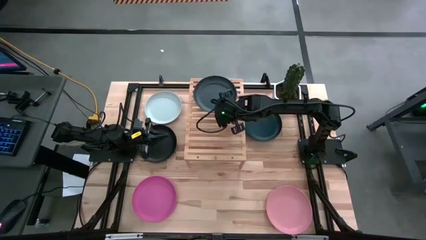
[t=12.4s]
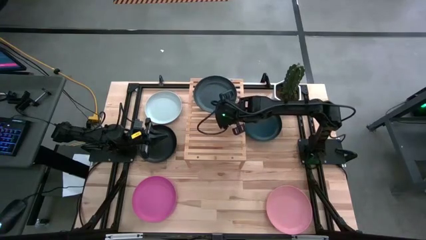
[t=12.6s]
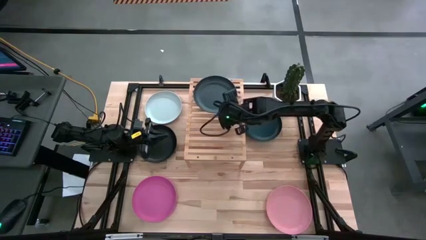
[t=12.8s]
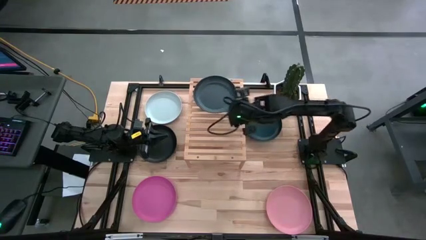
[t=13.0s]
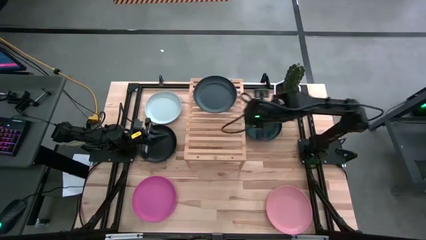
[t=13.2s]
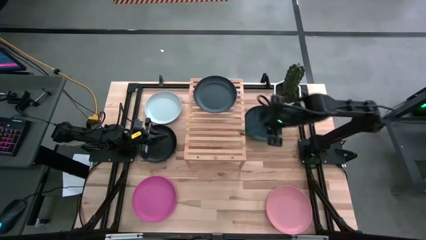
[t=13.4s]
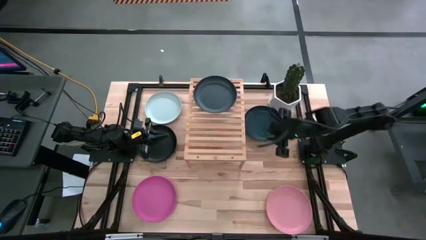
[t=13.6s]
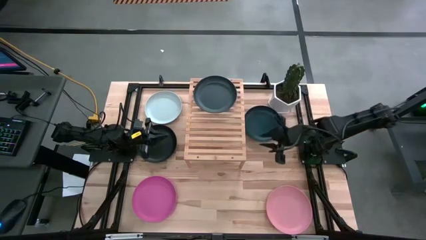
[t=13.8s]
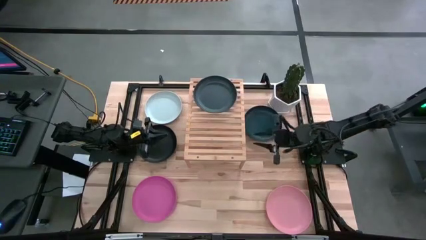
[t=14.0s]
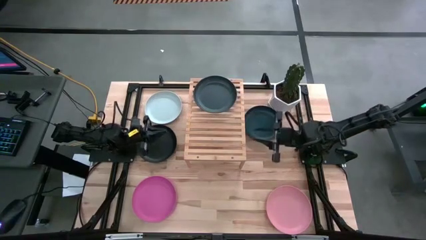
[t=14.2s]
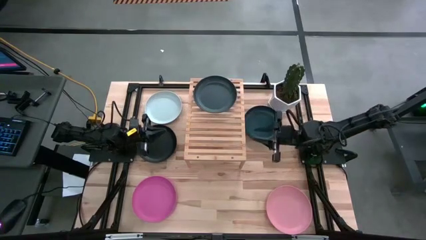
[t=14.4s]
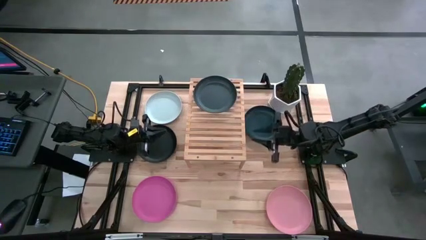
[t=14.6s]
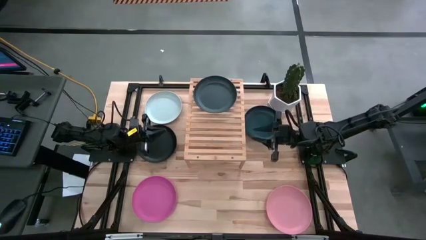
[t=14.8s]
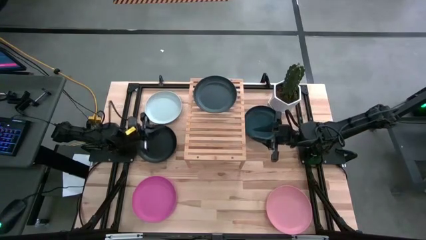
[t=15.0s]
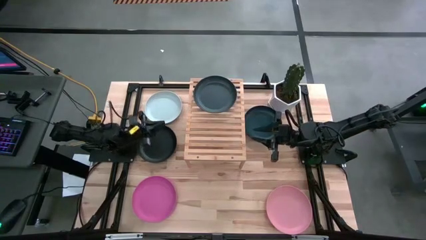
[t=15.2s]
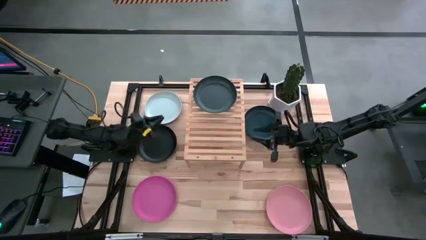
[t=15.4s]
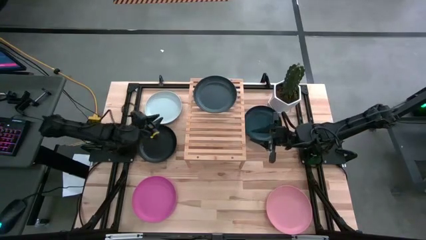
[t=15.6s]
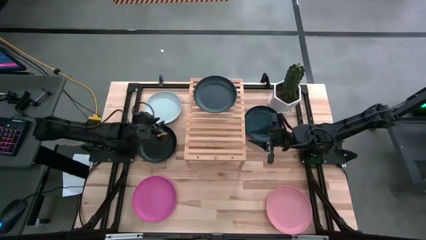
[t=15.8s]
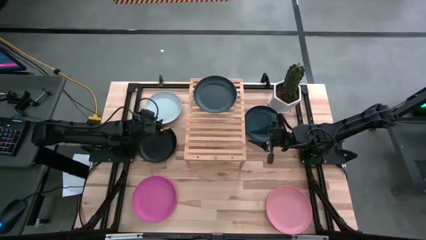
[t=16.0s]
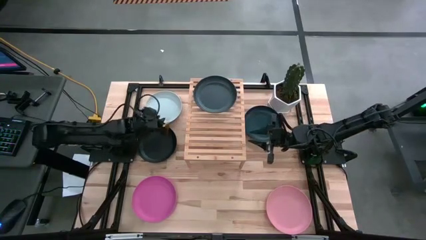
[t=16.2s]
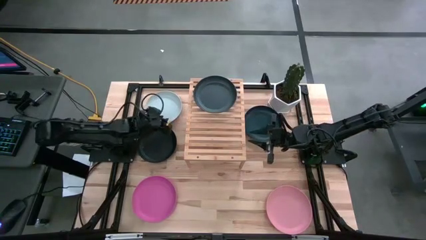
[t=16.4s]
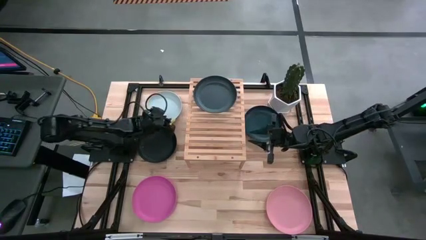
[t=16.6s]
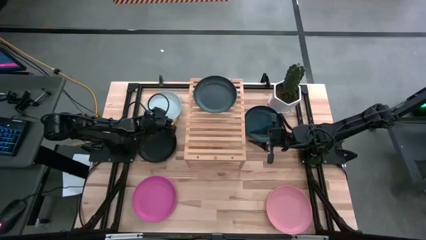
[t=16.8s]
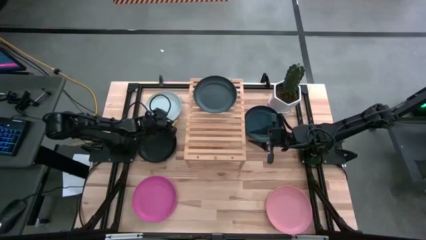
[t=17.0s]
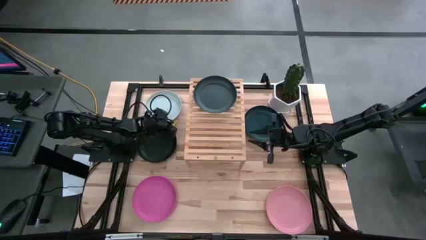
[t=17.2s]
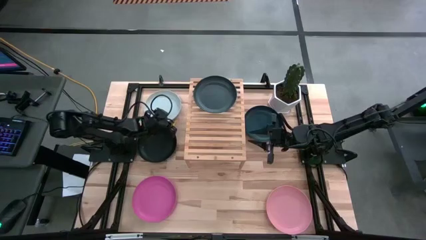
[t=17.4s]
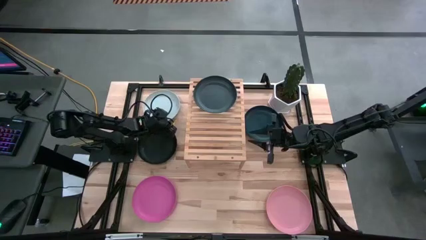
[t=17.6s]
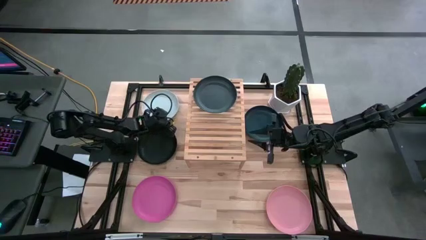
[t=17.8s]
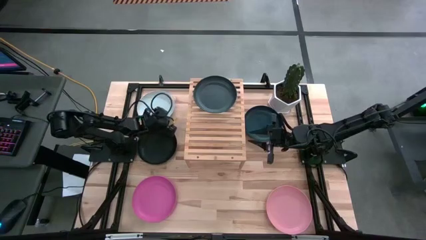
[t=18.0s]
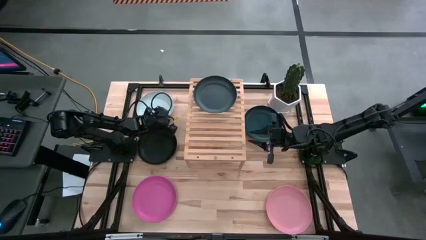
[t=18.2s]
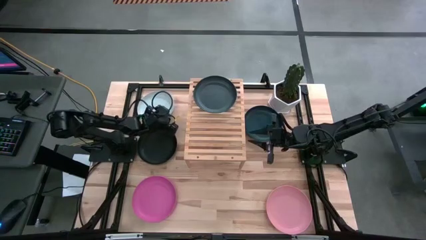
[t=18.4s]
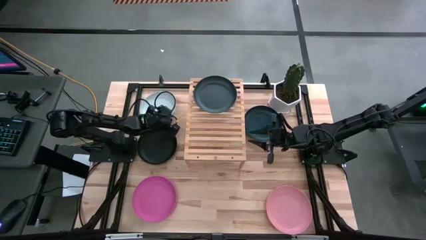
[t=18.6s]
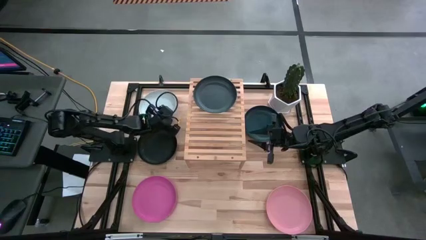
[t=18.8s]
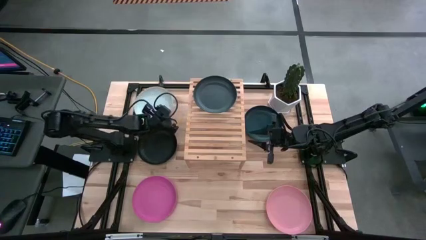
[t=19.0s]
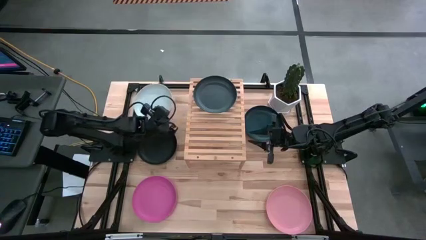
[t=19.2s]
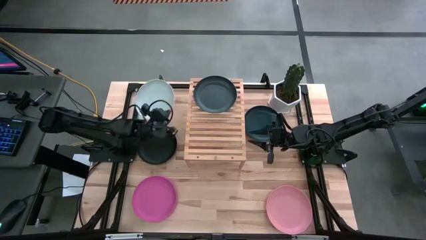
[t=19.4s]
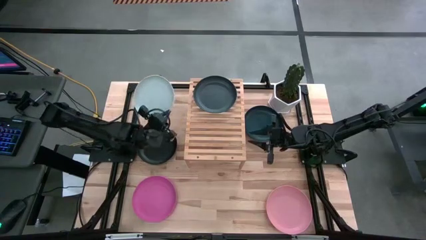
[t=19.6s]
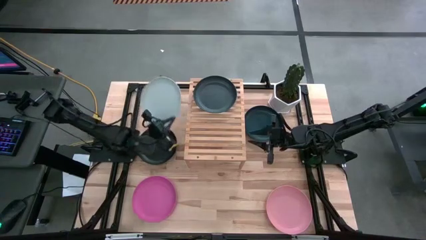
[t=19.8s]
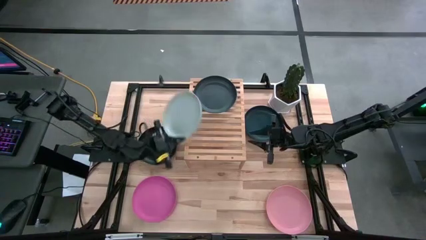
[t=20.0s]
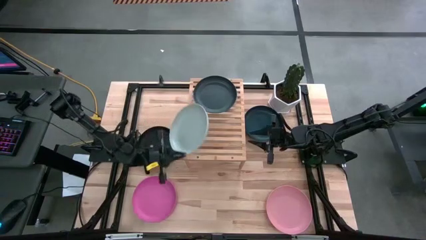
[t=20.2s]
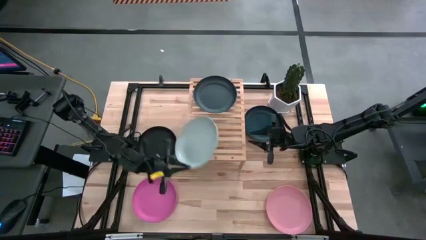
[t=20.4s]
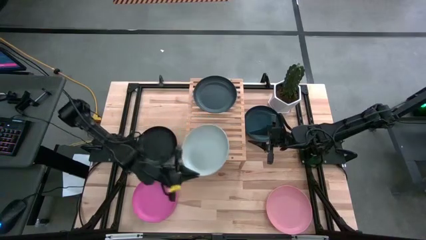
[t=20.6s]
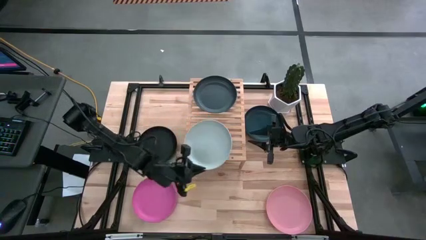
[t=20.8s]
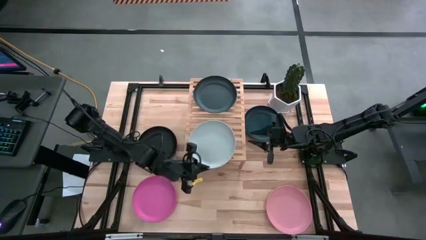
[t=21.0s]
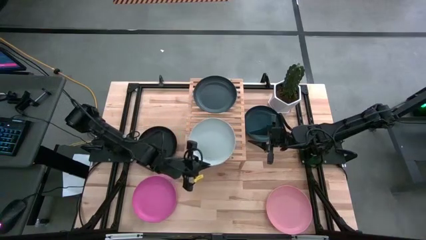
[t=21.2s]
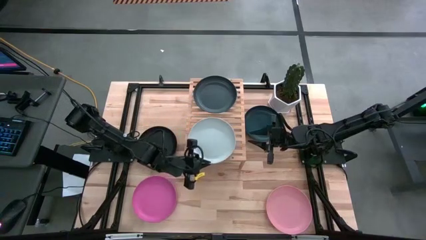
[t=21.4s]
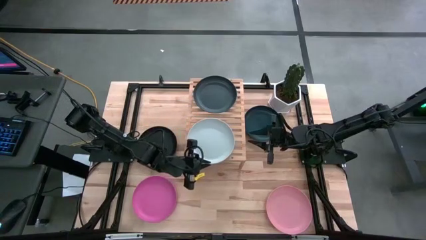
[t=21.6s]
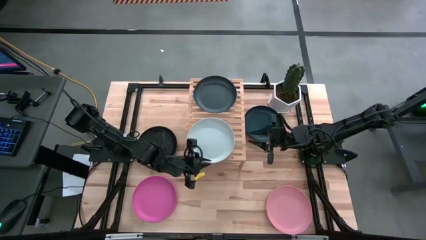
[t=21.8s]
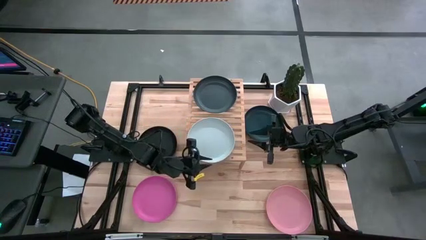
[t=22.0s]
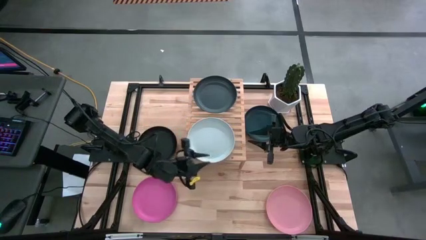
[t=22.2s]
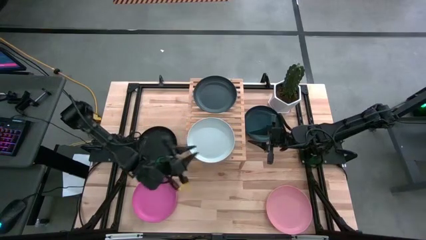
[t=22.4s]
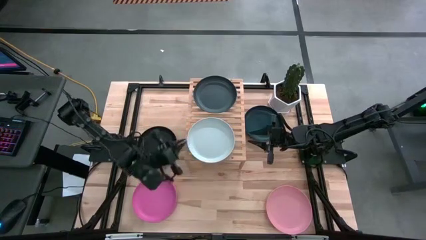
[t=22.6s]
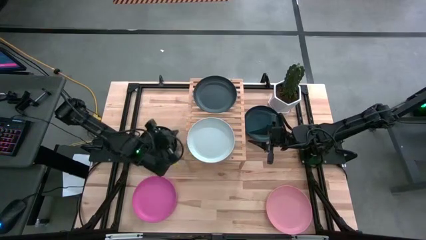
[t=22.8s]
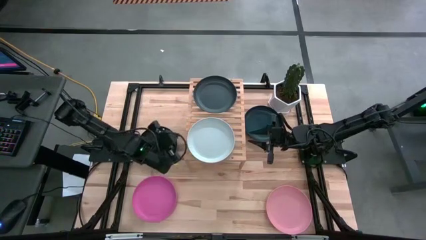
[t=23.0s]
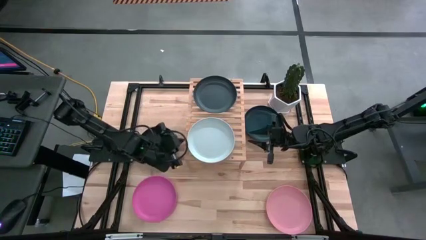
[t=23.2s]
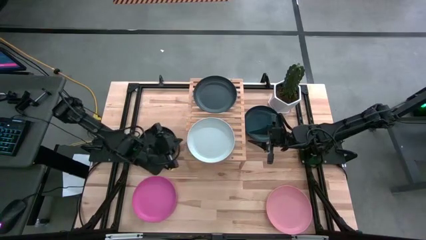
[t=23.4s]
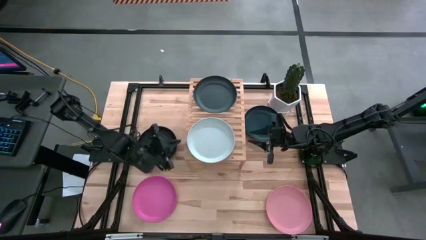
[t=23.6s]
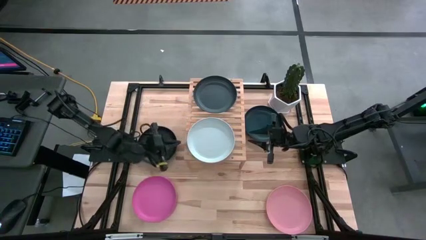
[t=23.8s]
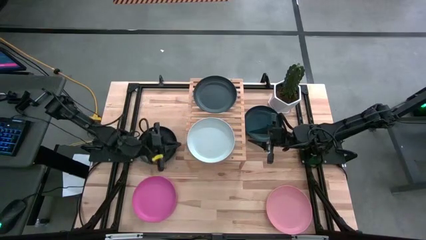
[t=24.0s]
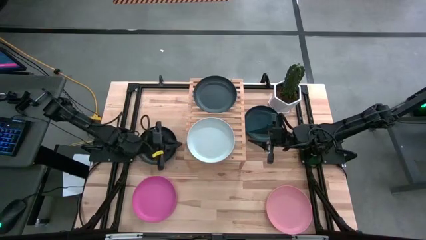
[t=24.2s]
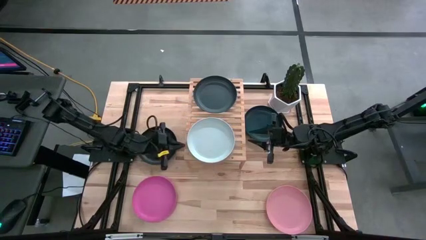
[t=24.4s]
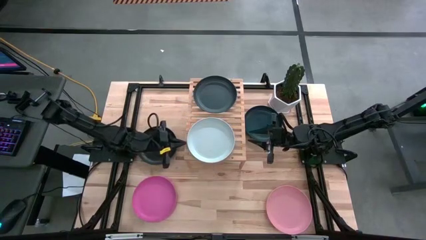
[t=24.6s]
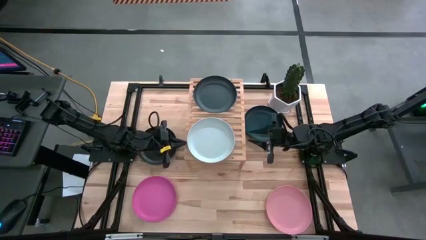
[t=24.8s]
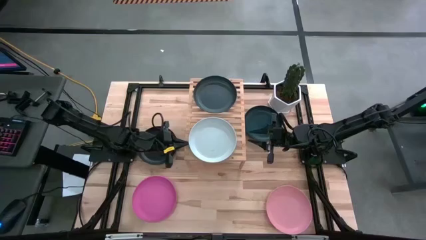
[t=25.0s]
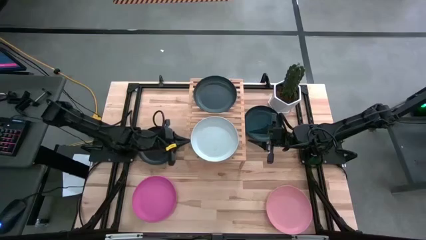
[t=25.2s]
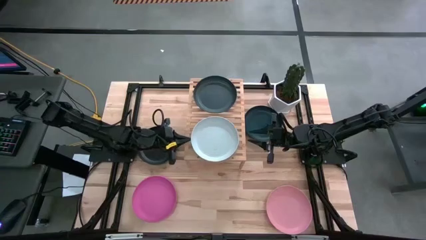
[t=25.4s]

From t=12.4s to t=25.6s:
Task: Place and stack plates onto a shelf
Put the white plate on the shelf
